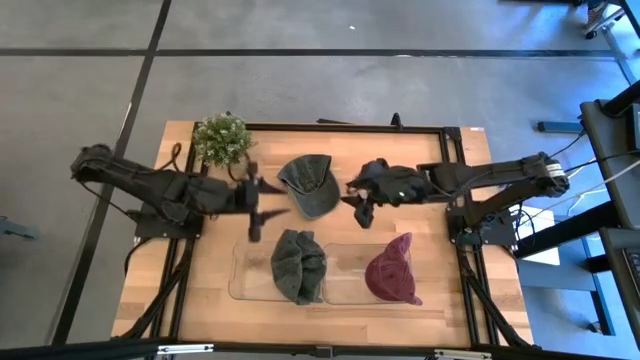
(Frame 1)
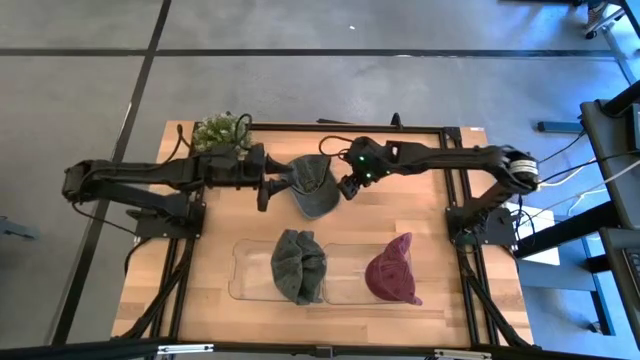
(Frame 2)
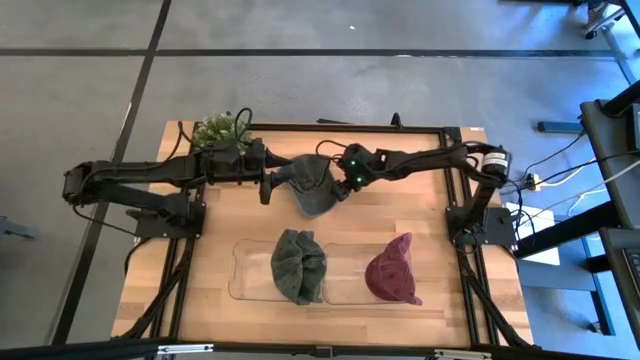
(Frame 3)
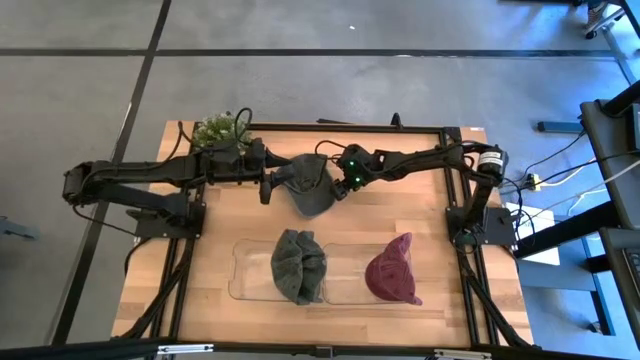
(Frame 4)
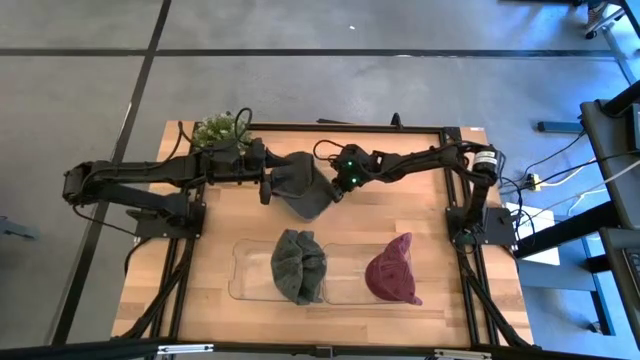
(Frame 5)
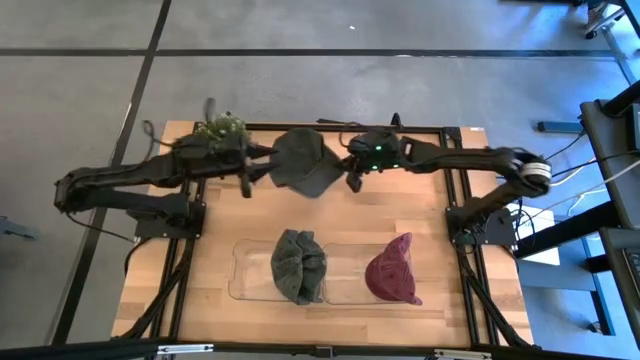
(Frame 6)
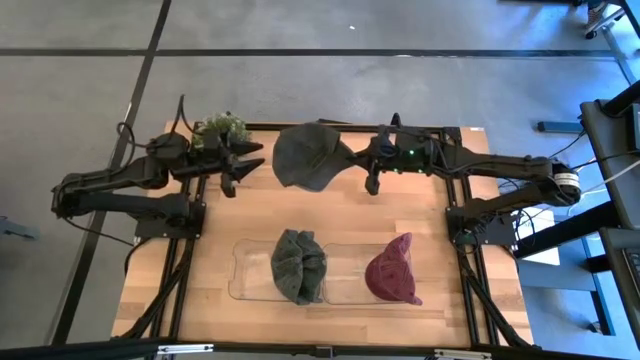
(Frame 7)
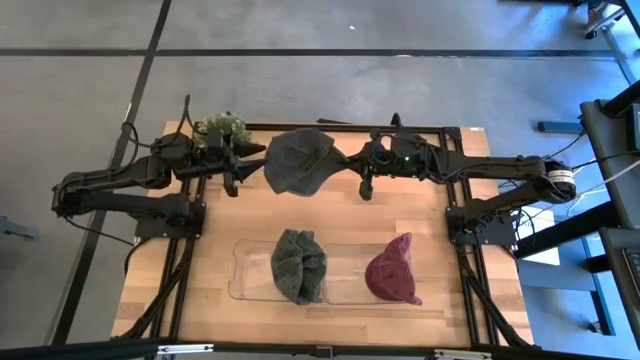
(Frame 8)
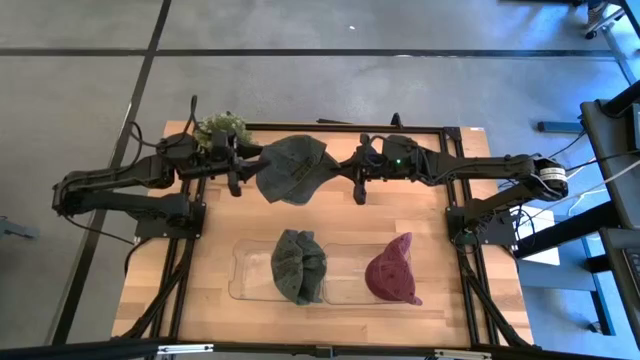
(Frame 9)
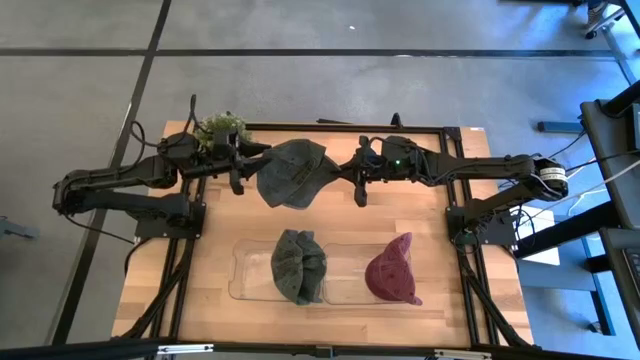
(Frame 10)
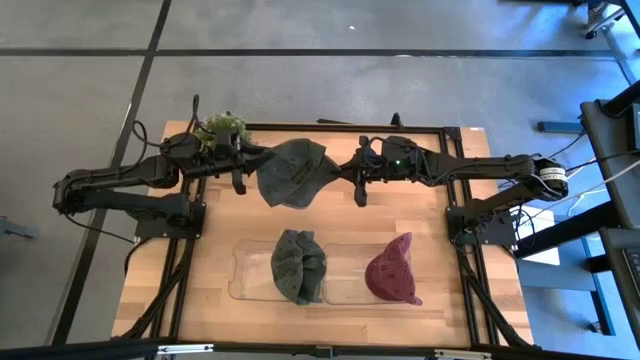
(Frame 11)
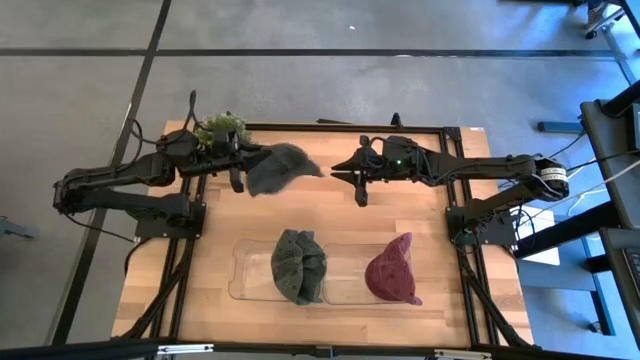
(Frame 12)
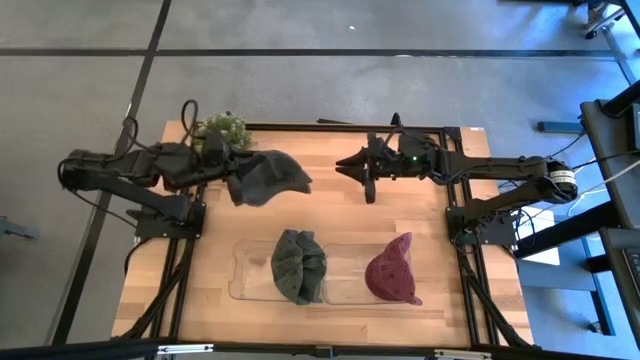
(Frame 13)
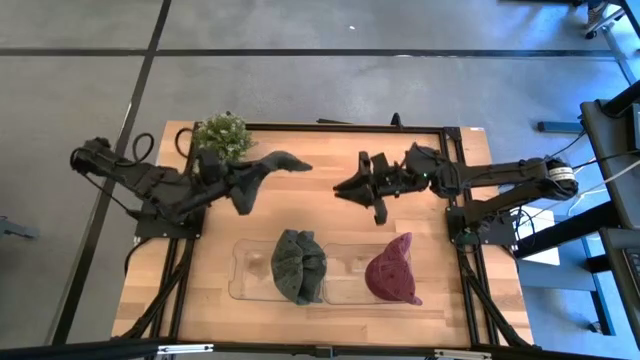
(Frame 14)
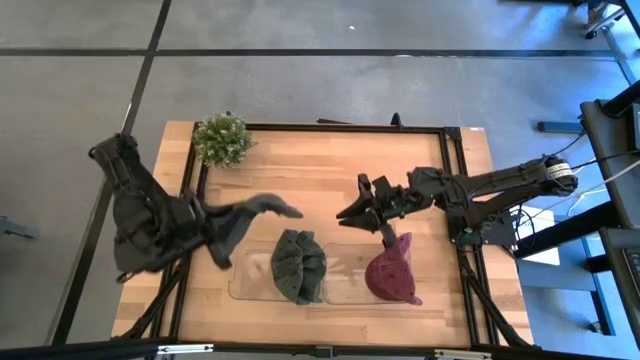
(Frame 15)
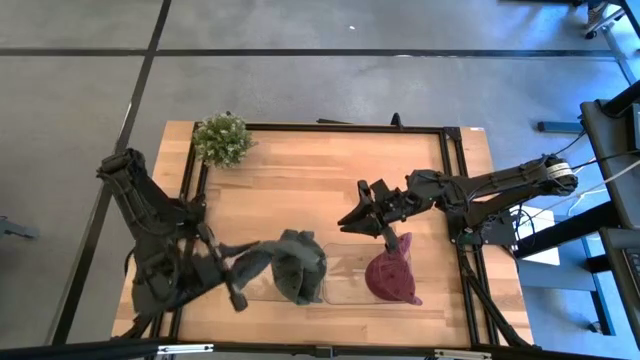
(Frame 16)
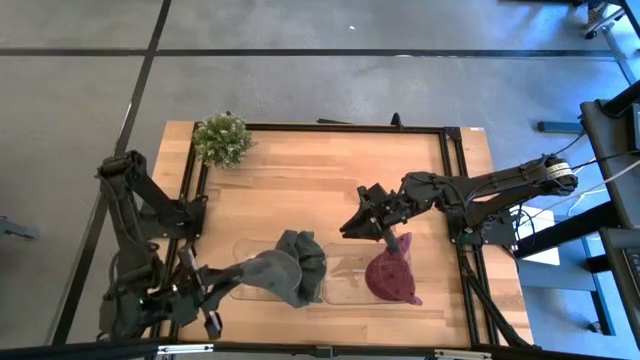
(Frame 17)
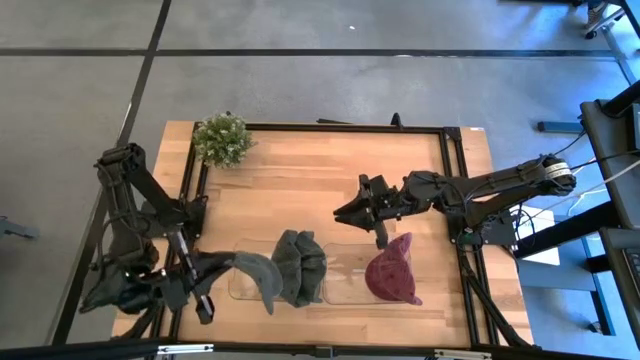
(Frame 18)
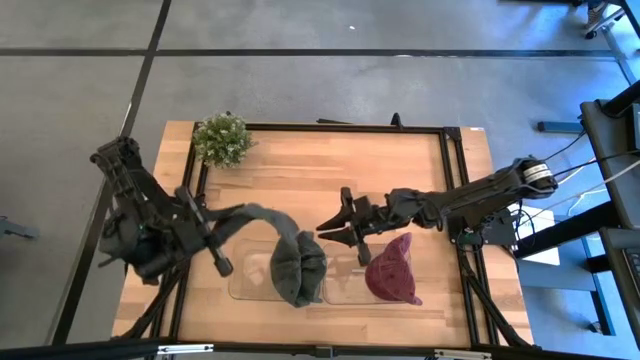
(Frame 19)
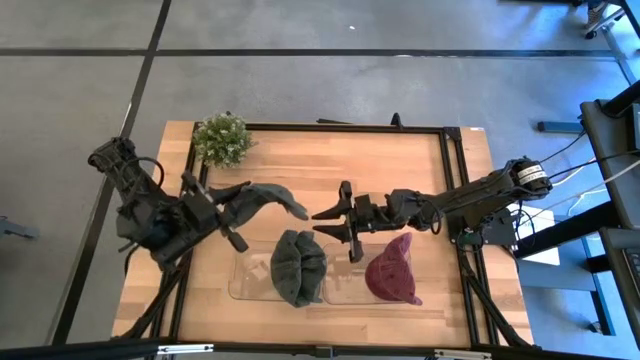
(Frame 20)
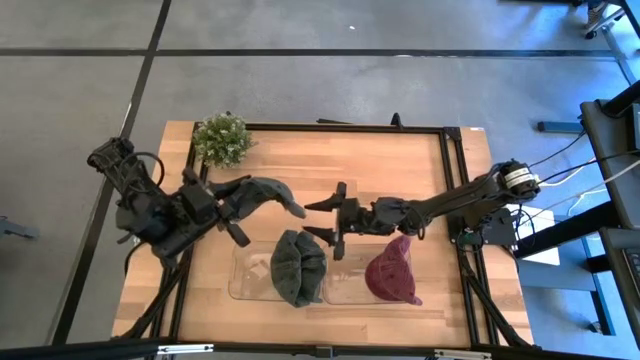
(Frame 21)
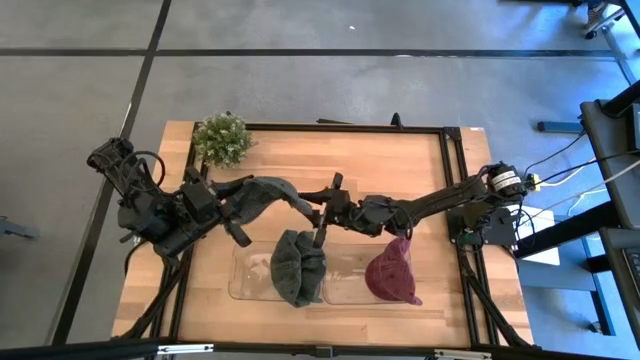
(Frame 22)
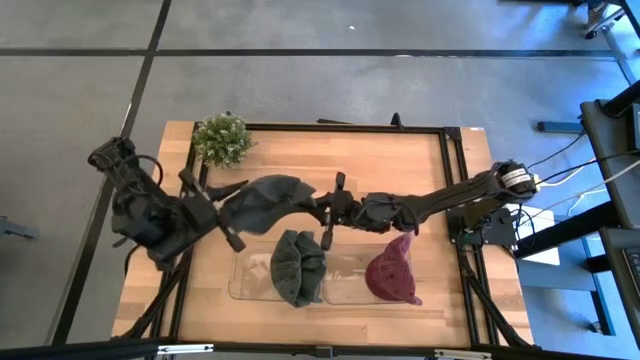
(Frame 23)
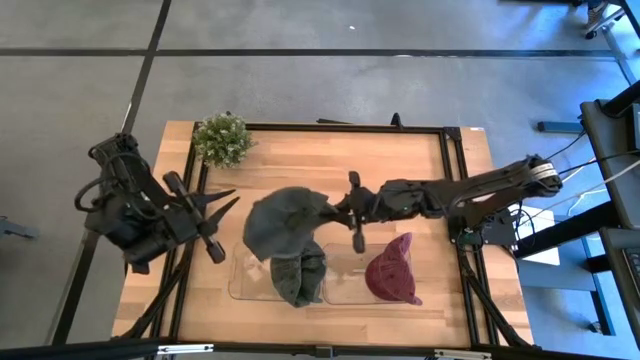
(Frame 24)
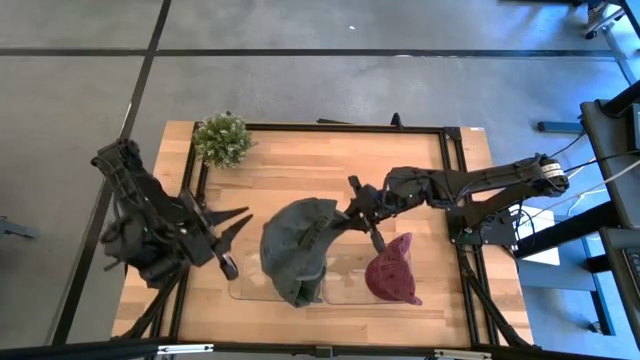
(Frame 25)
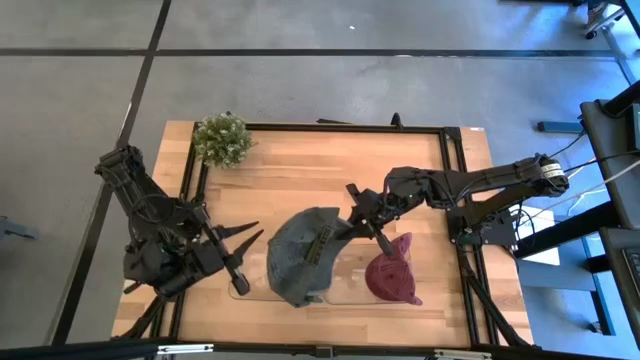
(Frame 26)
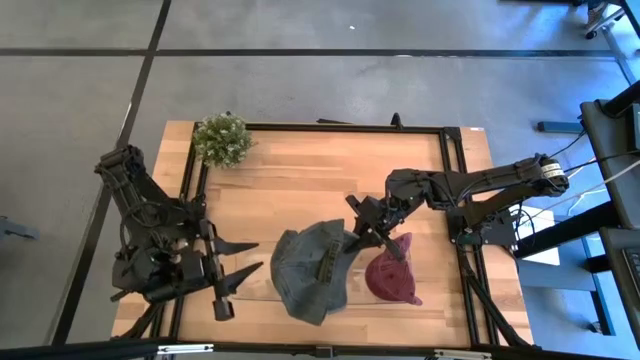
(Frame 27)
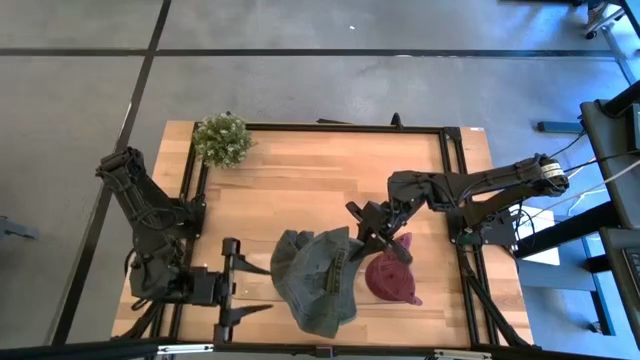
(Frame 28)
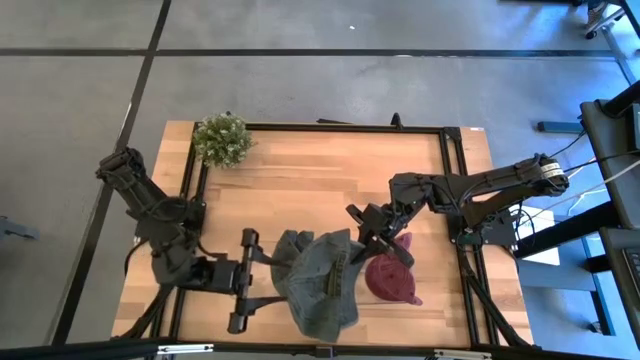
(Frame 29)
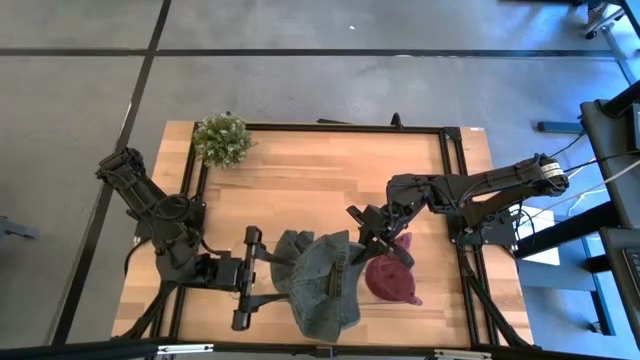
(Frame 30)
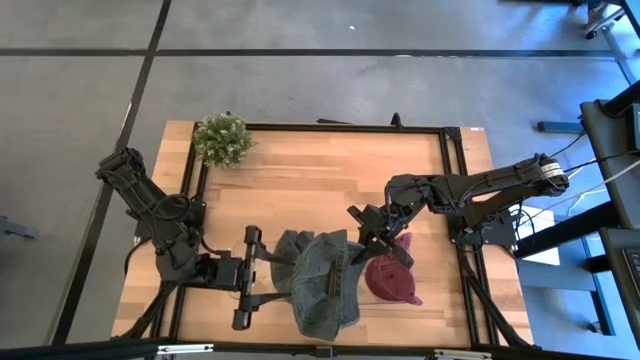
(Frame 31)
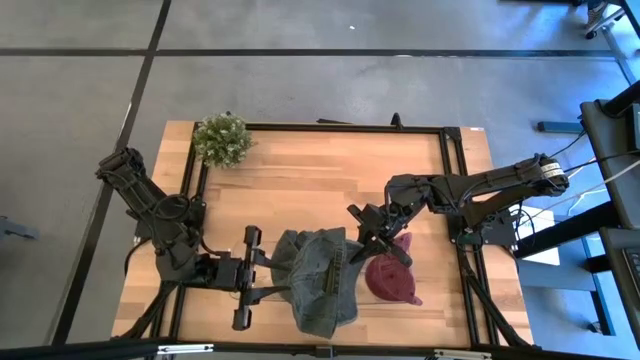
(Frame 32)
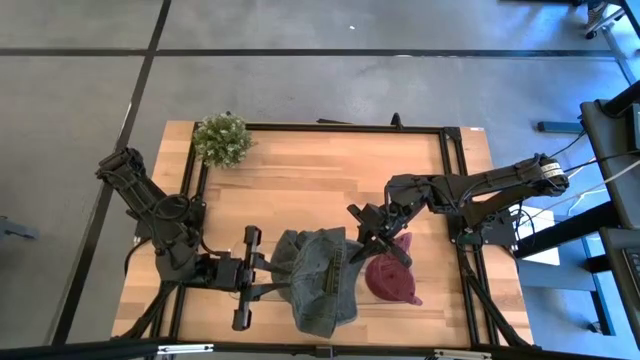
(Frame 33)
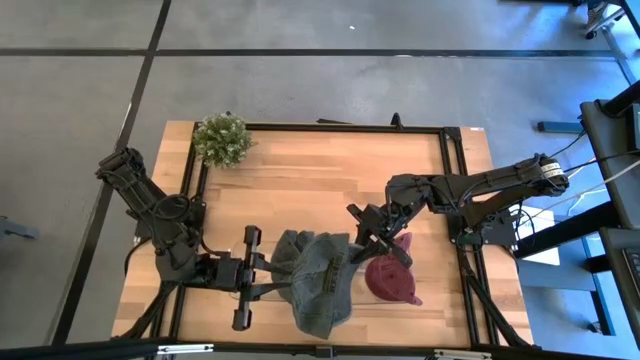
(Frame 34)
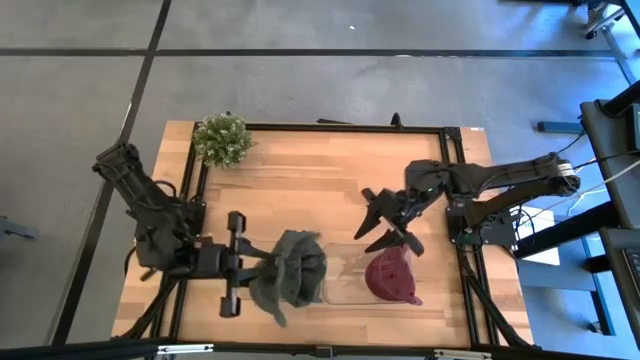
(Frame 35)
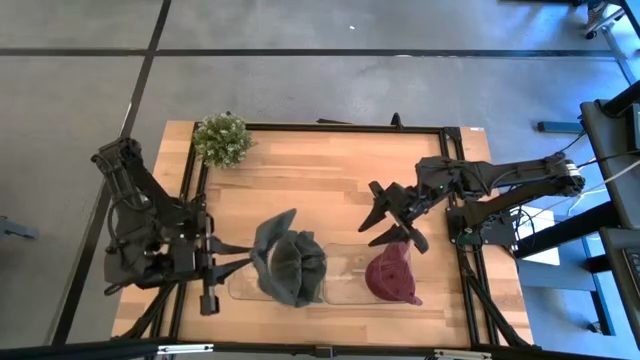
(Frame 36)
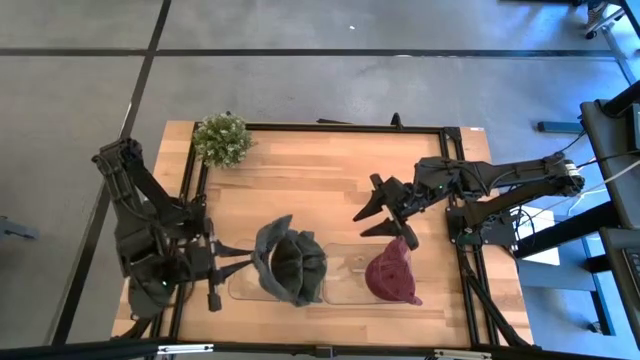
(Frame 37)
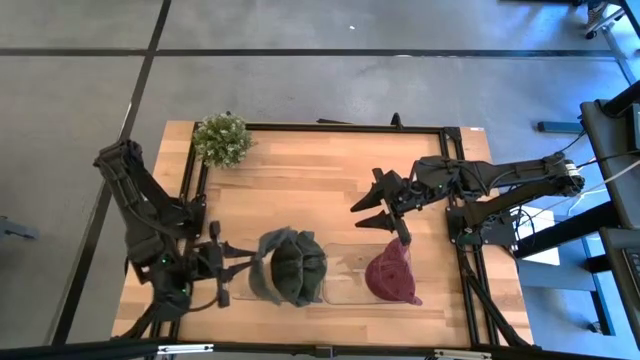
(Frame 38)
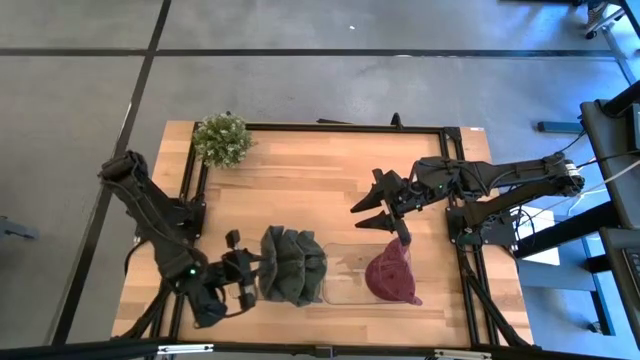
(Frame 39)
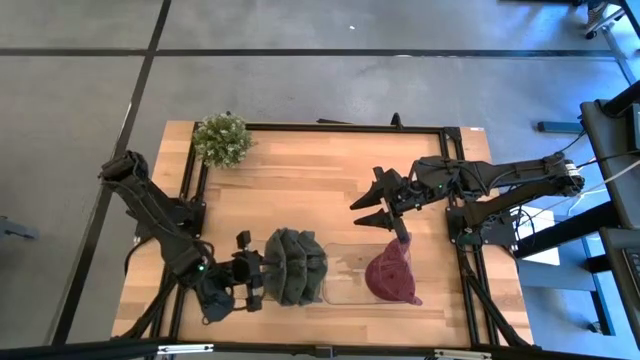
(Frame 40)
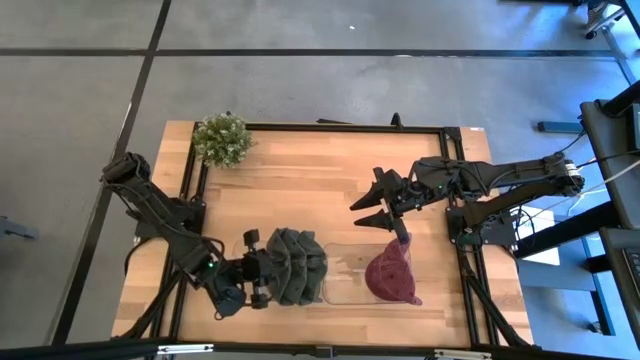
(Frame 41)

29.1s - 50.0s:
Task: Pick & Place hat
Put the grey cap into the left transparent bin

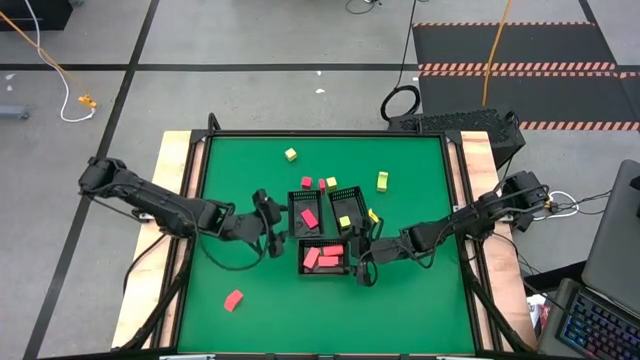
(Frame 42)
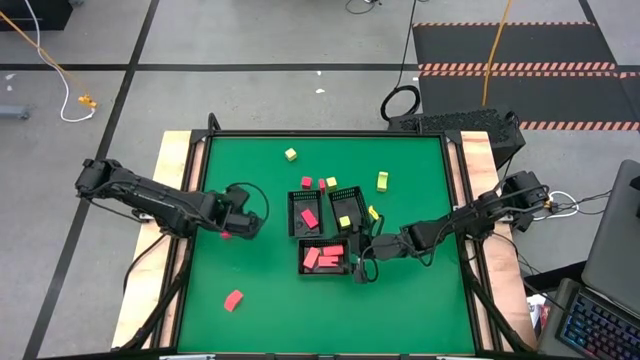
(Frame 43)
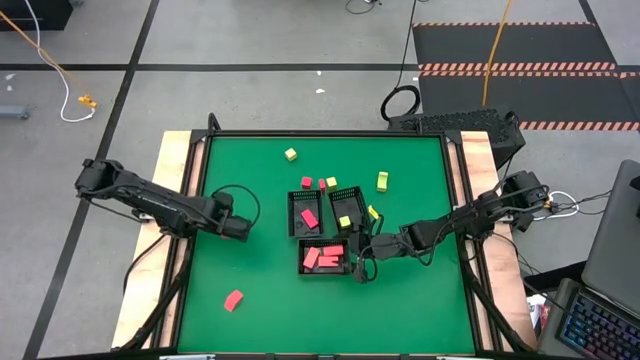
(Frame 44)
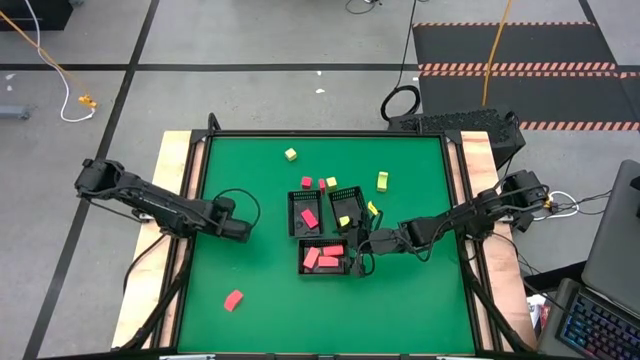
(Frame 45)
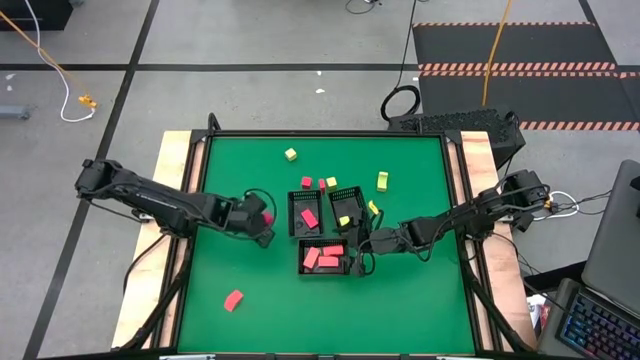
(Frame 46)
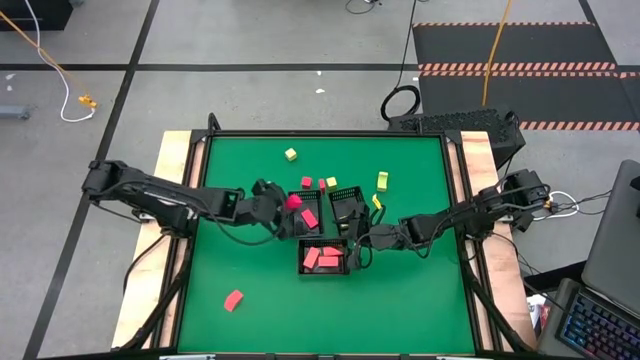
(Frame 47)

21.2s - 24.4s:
Task: Sort & place blocks by color
Put the red block into the top left black bin
